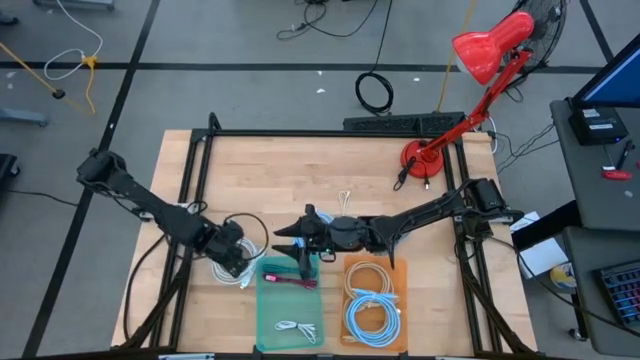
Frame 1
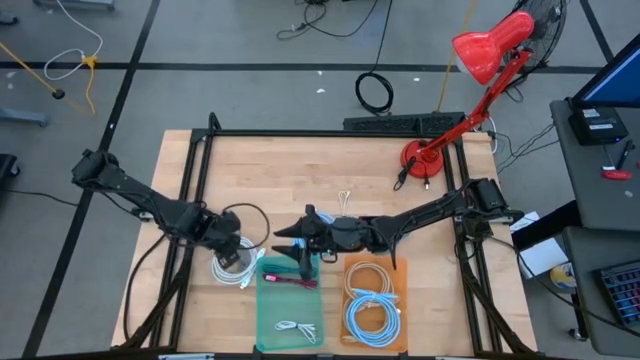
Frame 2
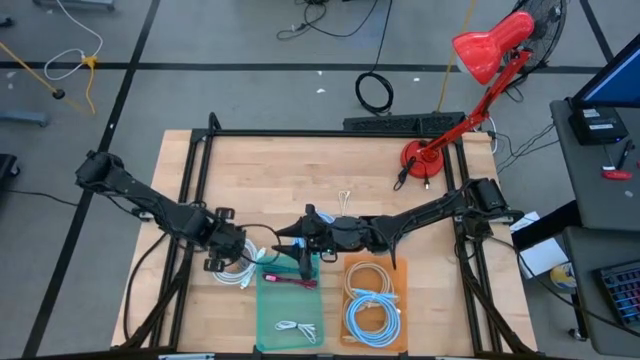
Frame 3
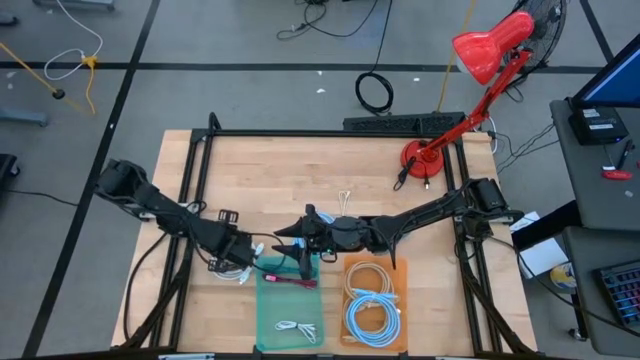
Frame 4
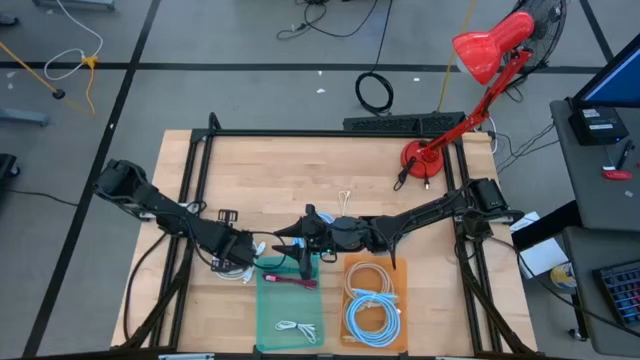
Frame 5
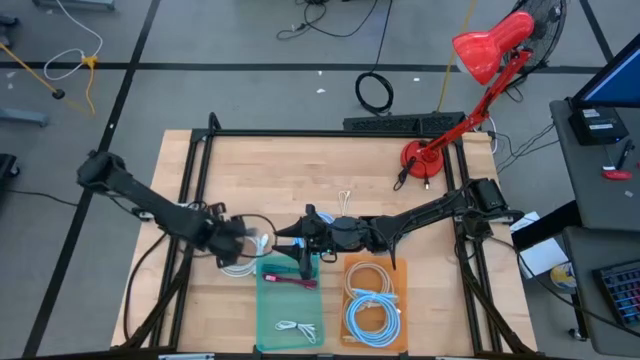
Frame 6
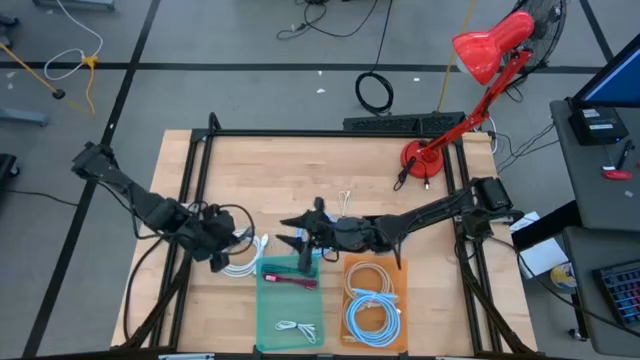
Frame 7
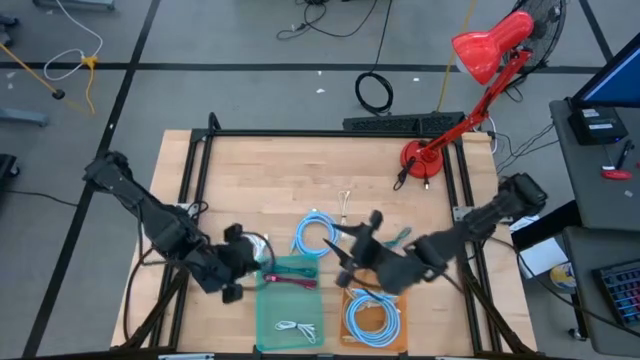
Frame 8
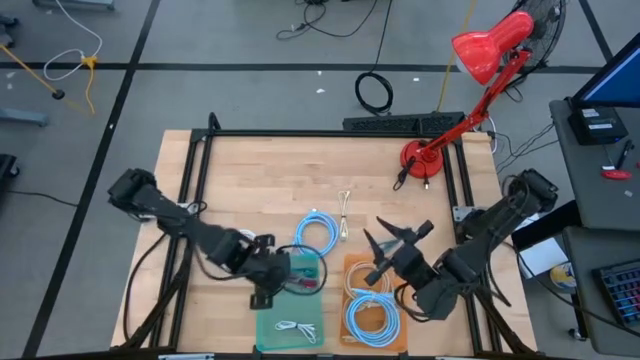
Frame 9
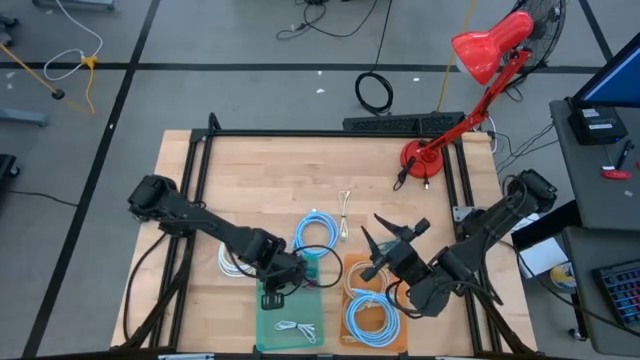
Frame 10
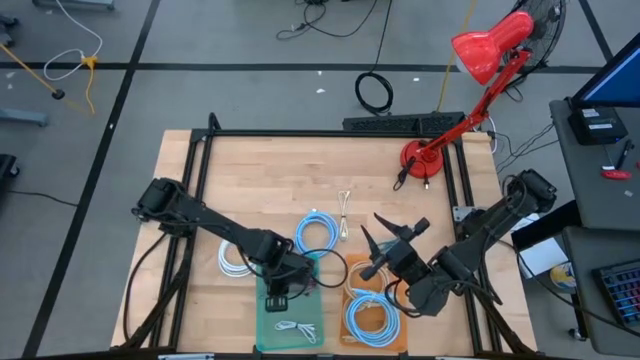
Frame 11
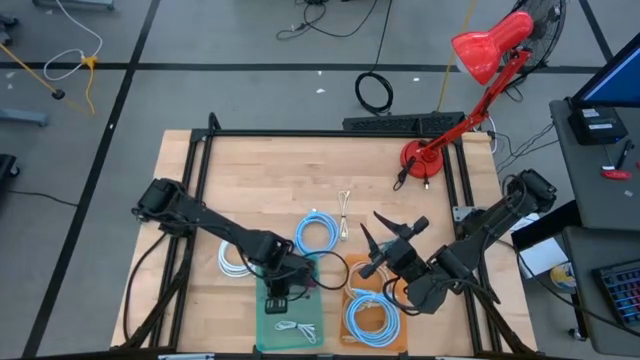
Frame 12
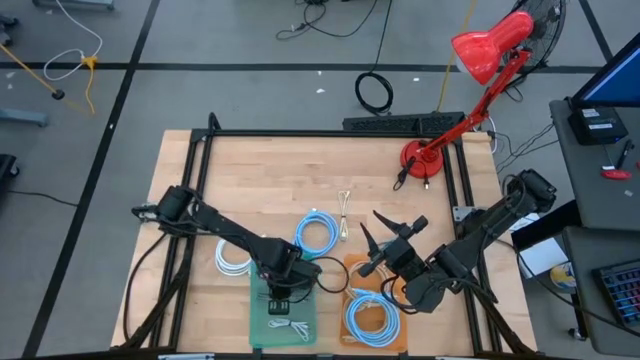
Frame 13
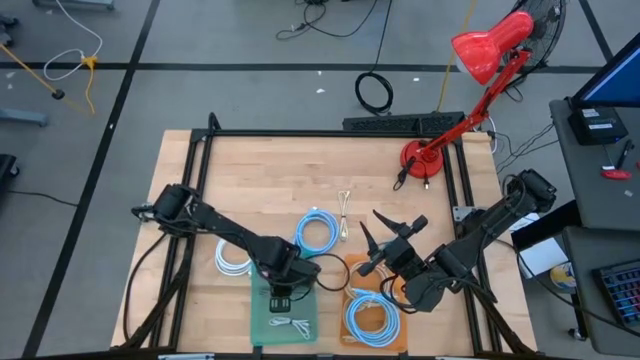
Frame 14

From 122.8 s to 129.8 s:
Task: Pick & Place USB Port
Put the black charger cable into the green bin

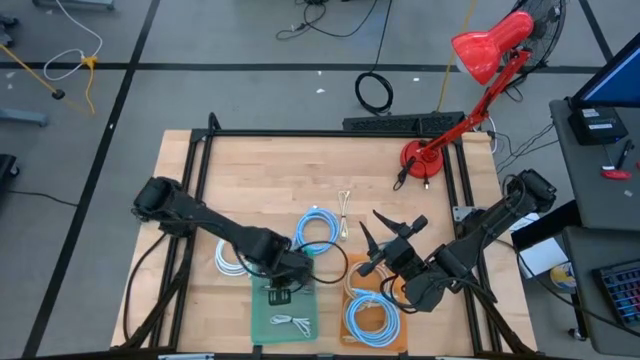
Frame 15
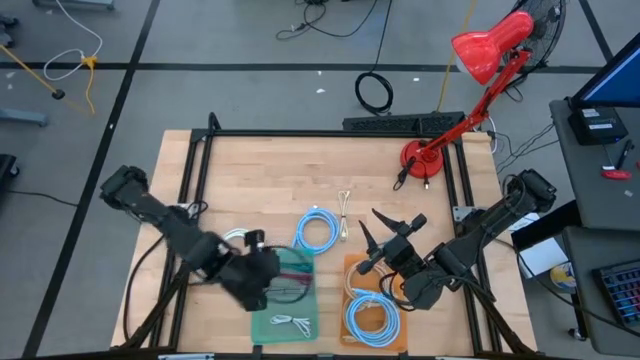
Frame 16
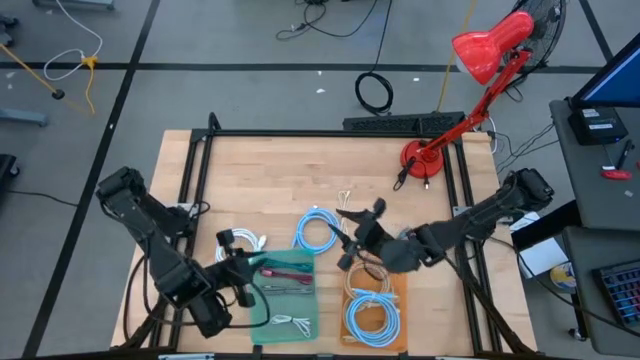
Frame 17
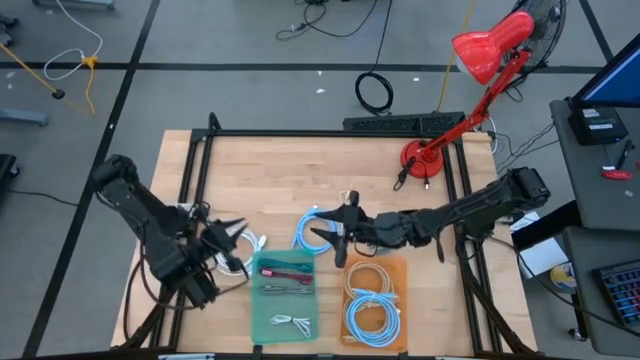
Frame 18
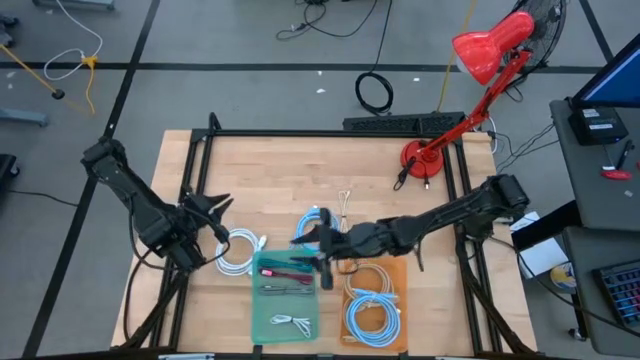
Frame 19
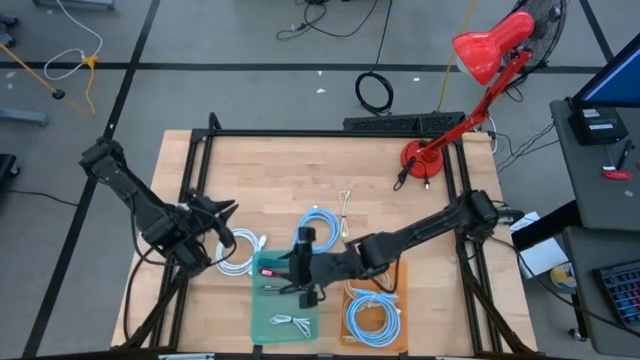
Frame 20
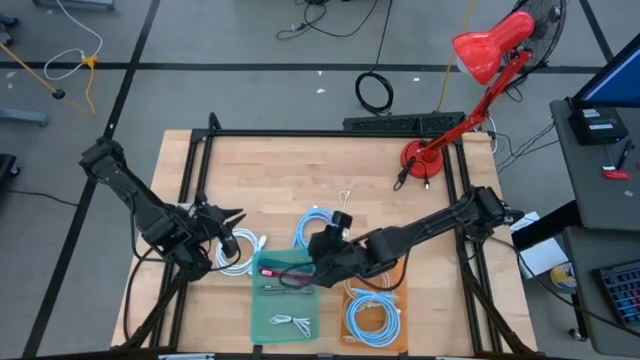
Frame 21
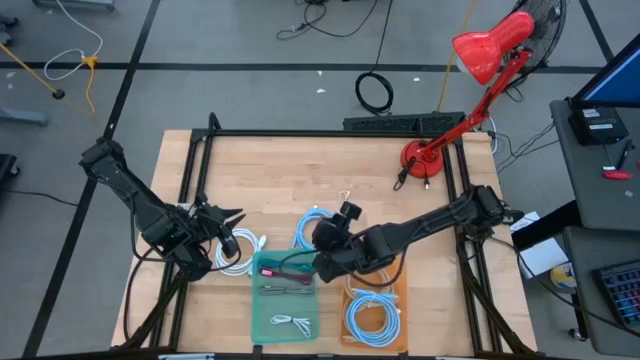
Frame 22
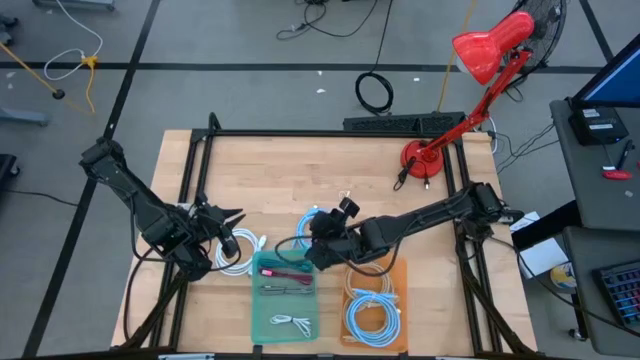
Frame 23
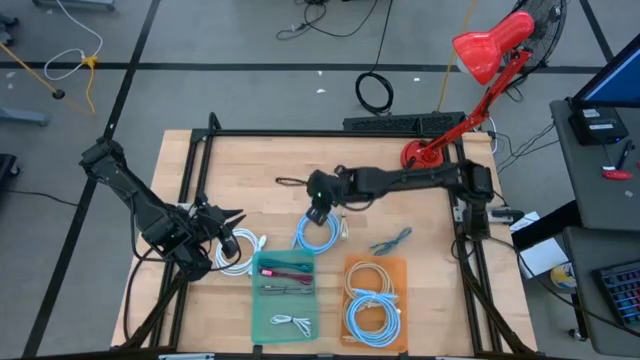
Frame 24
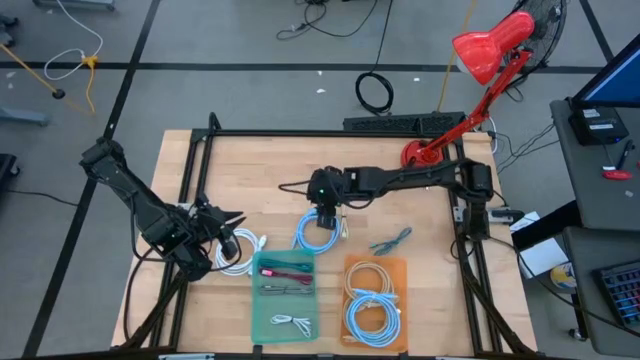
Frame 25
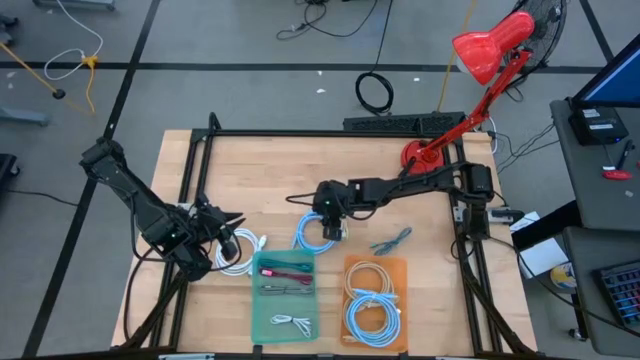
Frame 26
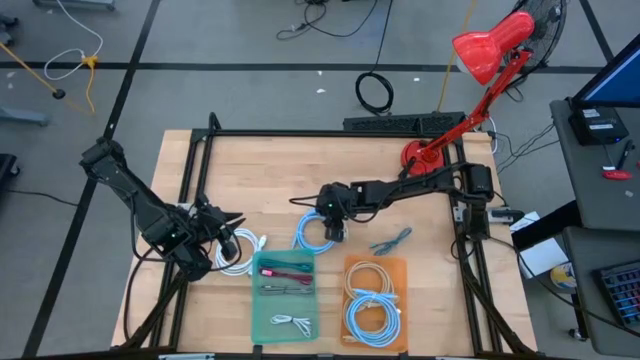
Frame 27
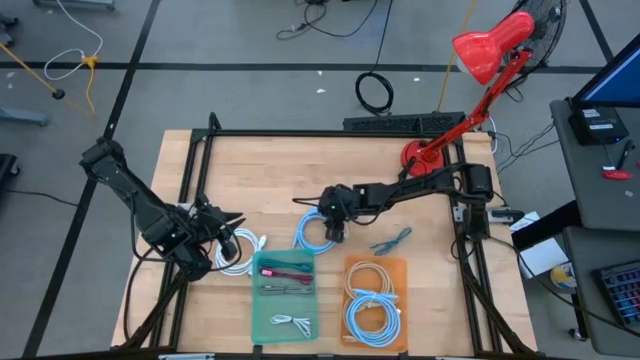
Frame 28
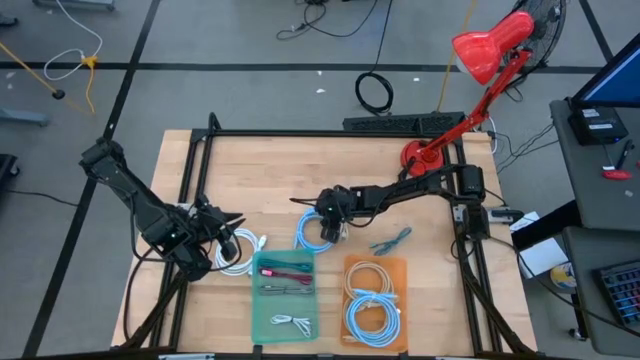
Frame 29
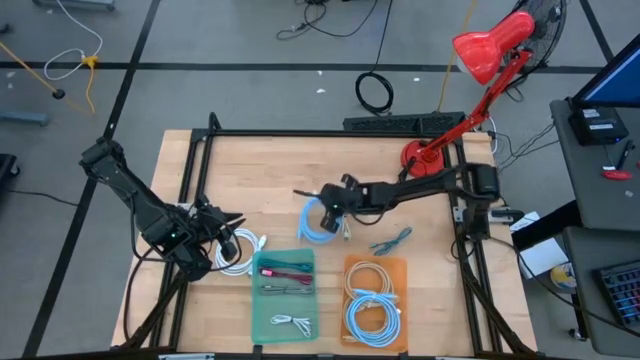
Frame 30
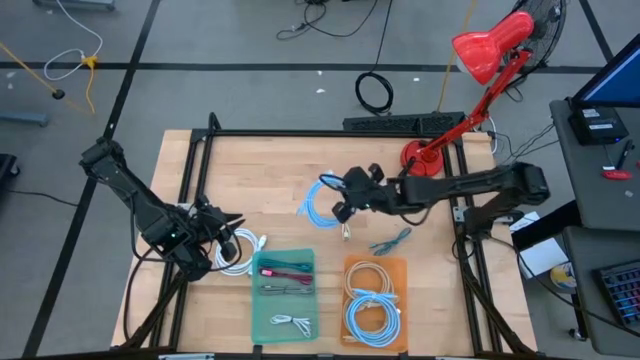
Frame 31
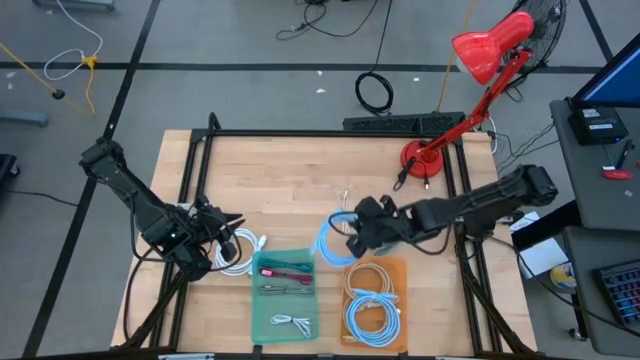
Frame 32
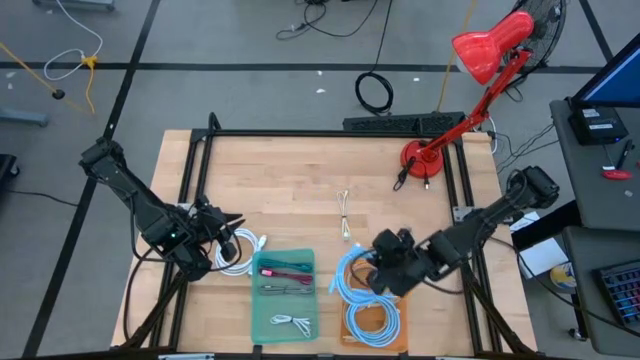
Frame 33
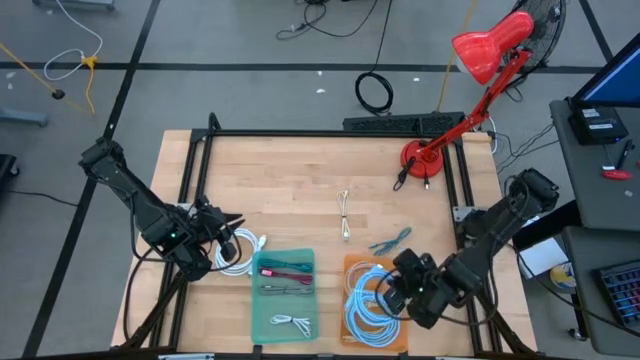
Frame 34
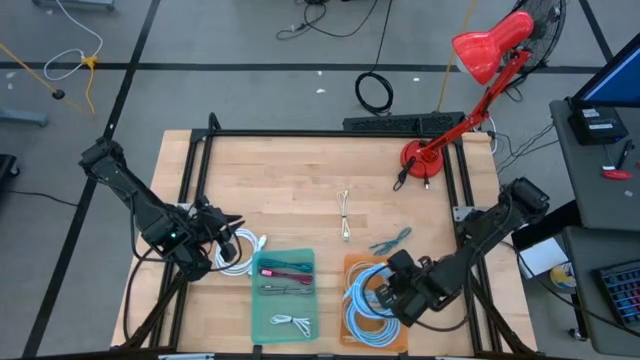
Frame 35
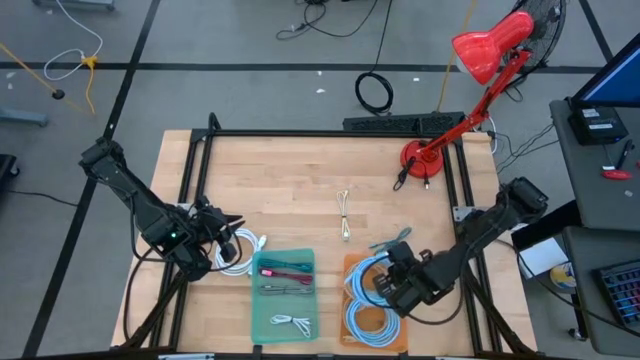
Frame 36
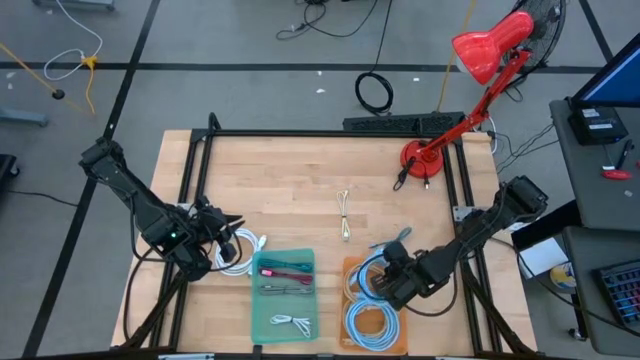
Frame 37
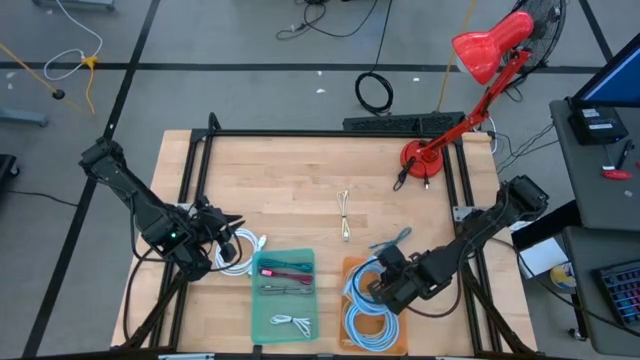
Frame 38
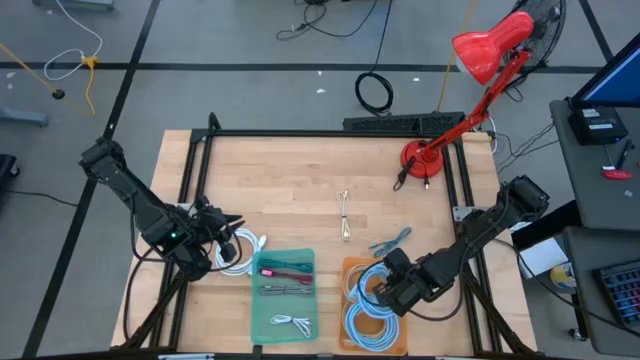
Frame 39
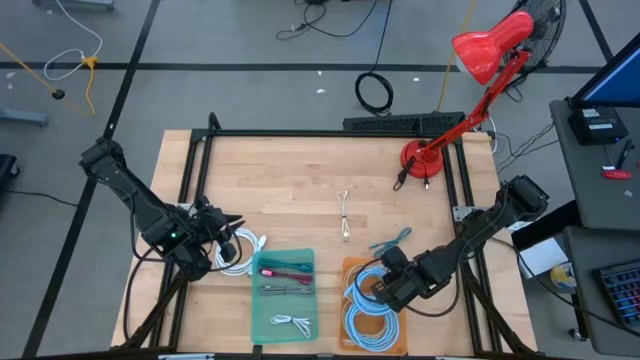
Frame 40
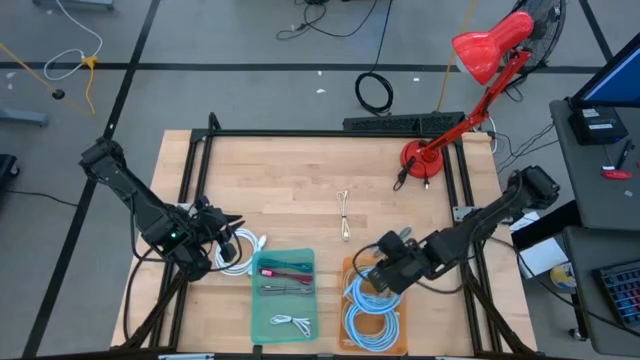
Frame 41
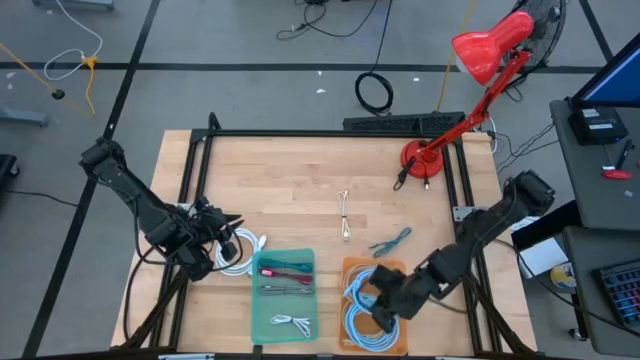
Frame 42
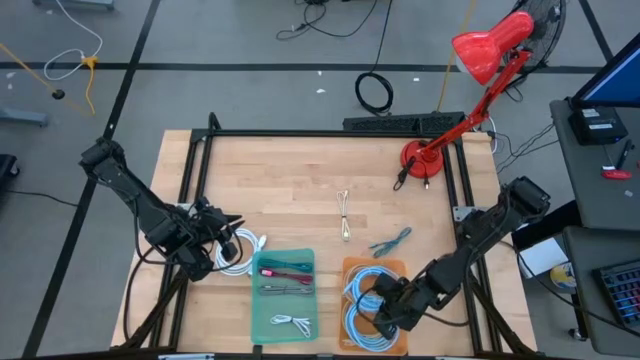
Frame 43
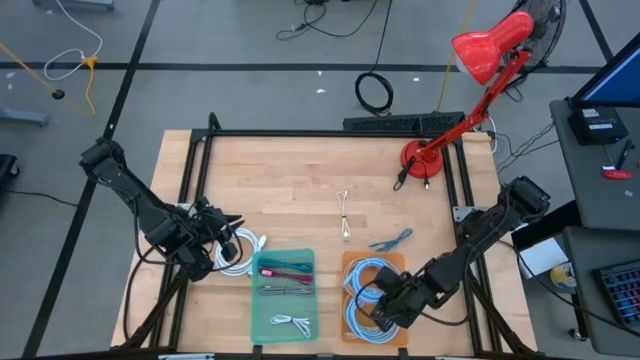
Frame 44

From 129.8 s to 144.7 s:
Put the blue video cable into the orange bin
